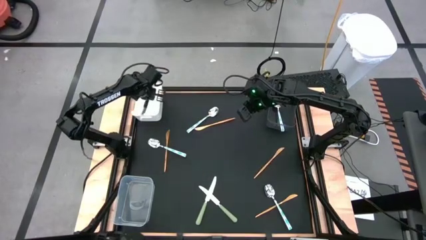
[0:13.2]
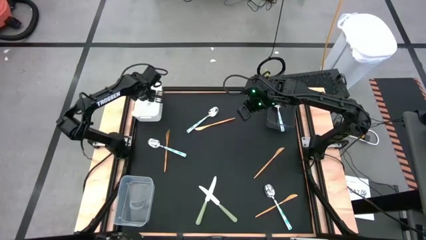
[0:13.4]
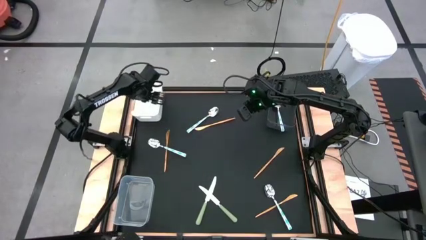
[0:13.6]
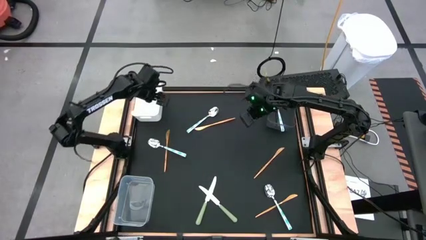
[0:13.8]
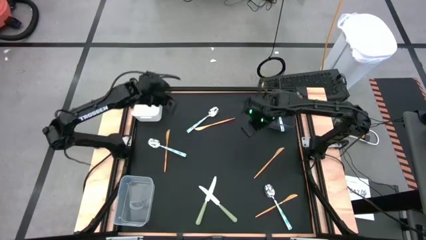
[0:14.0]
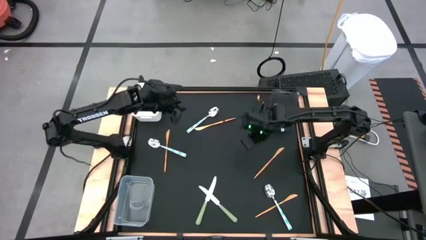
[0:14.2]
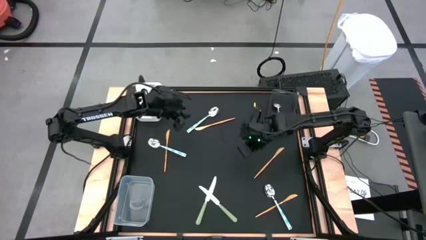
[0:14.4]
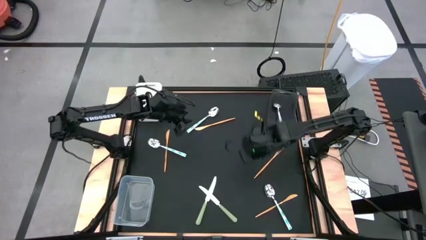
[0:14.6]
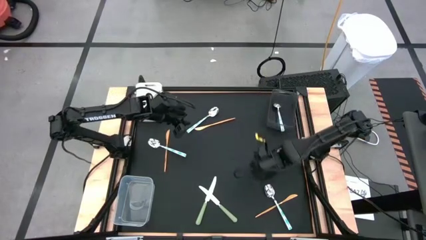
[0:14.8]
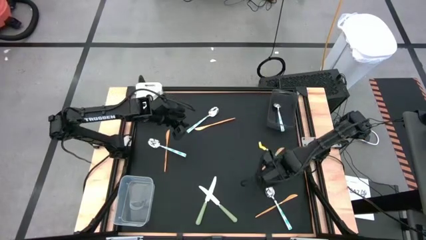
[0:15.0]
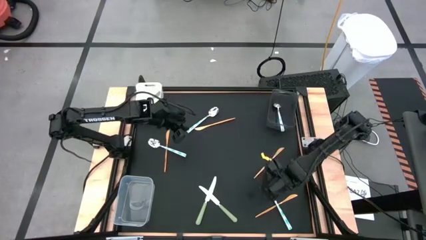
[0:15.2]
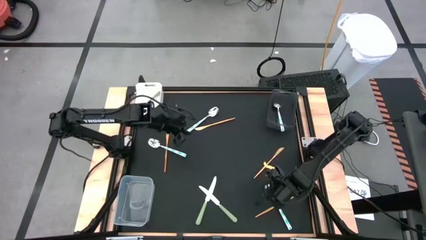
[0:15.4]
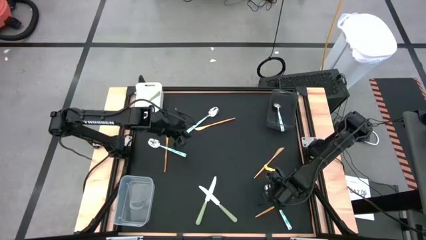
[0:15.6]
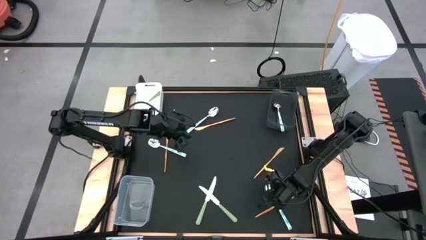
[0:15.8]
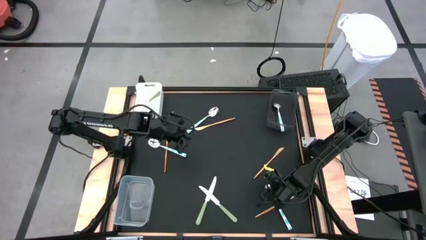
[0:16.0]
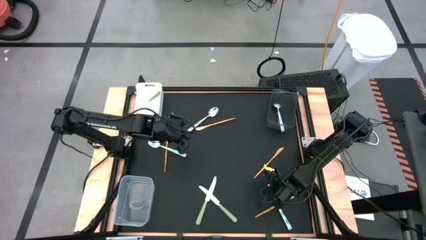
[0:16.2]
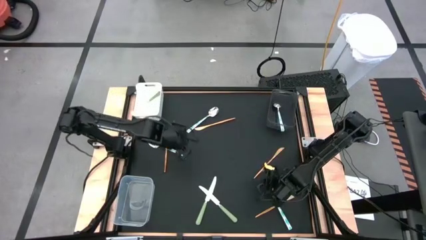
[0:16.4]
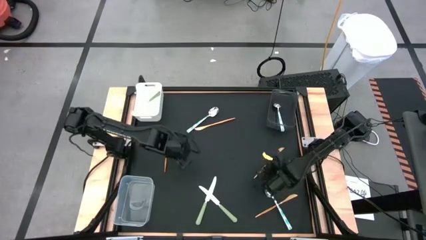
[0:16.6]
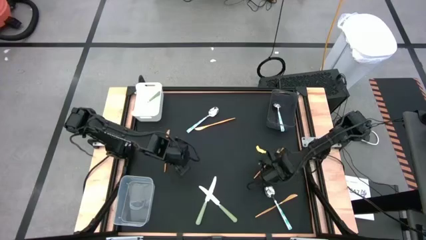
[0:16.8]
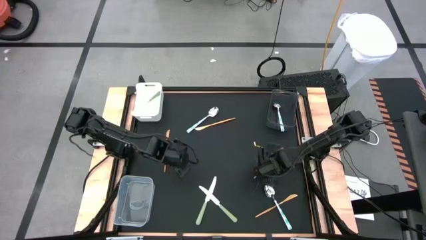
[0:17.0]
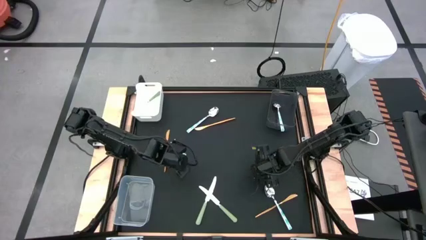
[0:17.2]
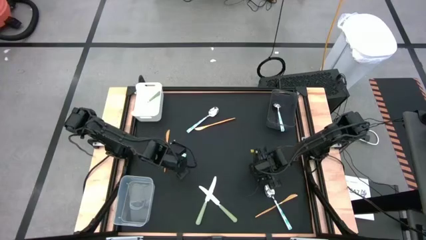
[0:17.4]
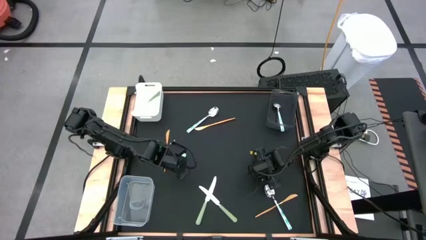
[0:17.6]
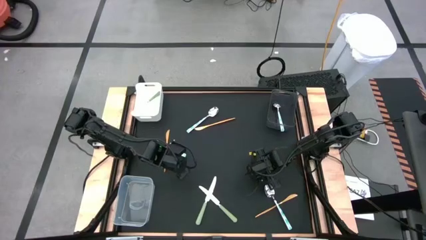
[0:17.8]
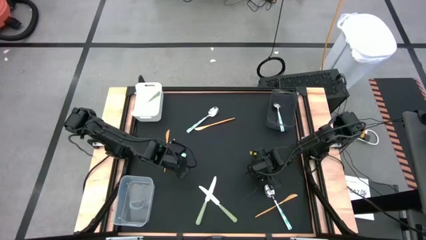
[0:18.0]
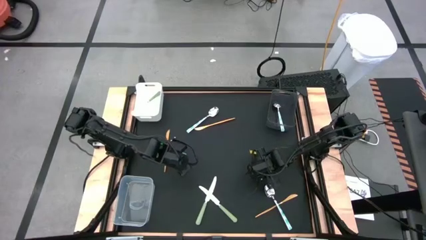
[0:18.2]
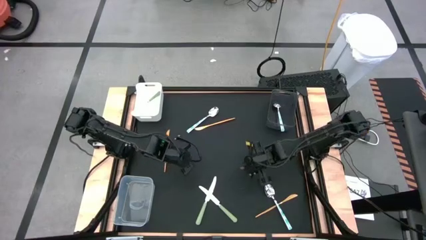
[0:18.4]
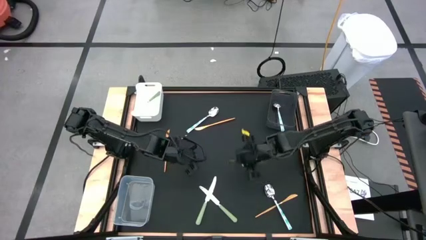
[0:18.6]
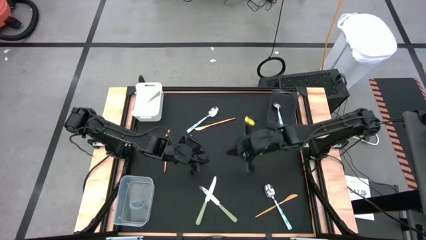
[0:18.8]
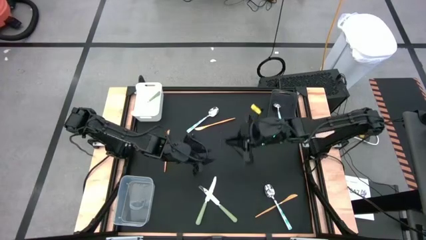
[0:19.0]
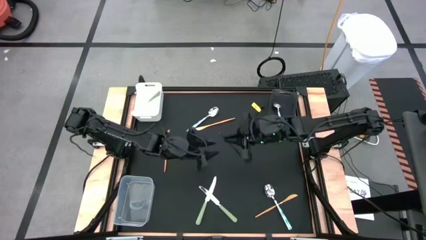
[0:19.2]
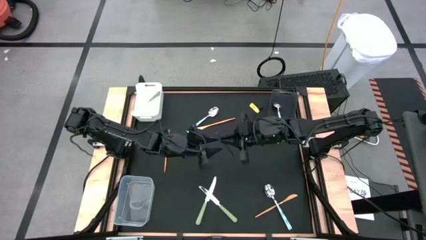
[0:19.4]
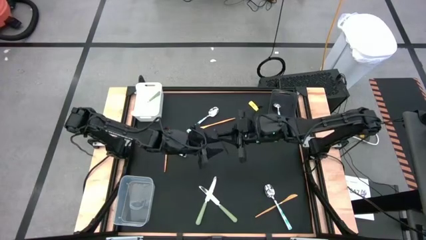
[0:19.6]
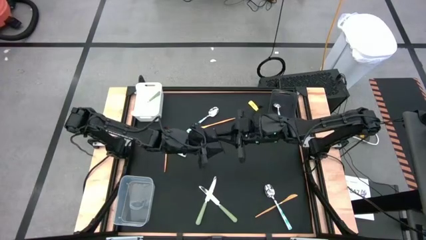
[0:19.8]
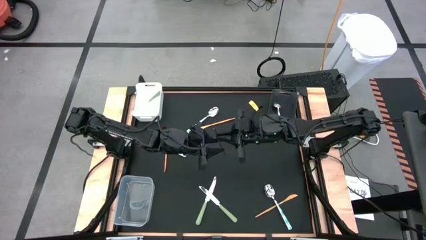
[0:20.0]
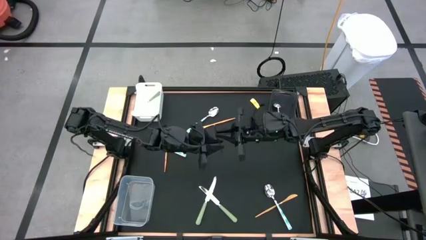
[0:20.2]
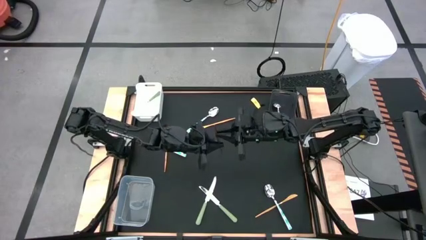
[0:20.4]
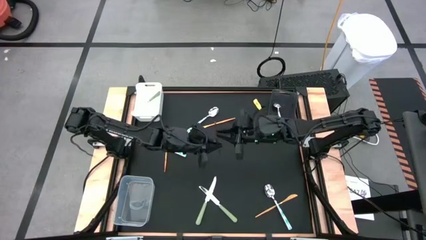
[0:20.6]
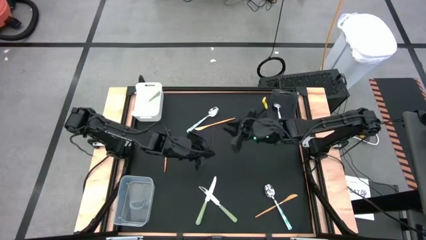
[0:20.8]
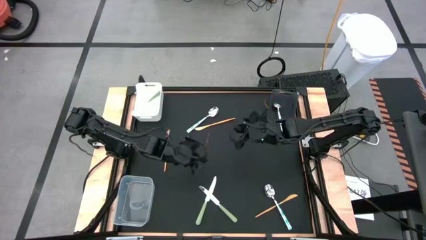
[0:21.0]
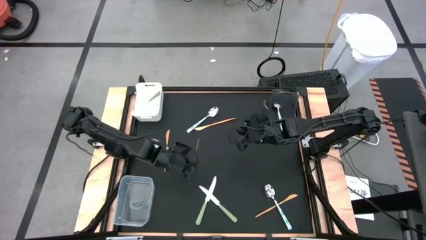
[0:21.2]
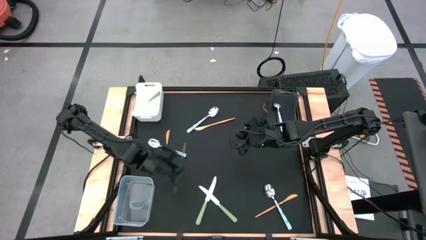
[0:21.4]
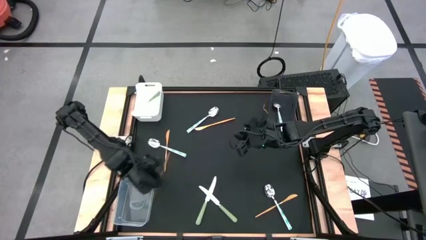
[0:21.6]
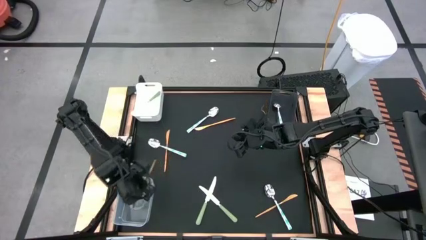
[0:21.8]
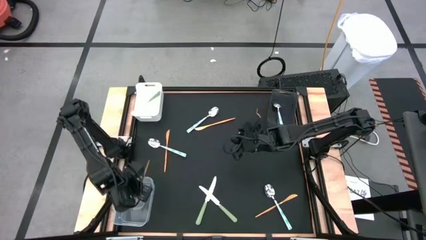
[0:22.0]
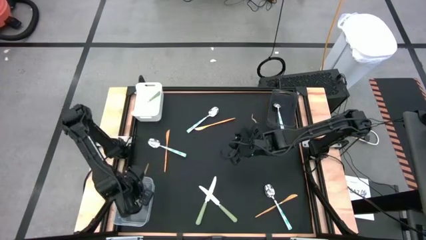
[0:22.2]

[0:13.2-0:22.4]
Task: Sort silverware by color (type)
Put the gold knife into the transparent bin

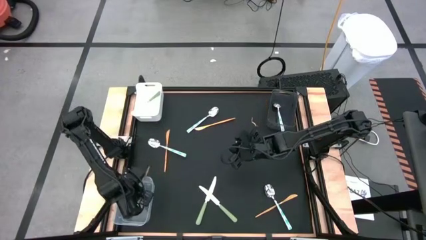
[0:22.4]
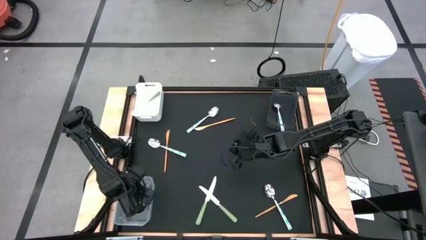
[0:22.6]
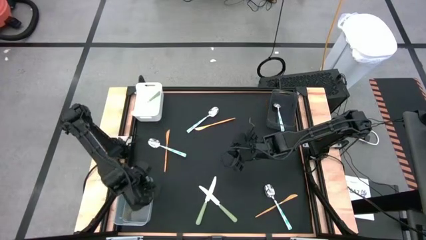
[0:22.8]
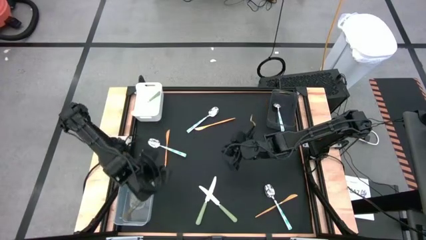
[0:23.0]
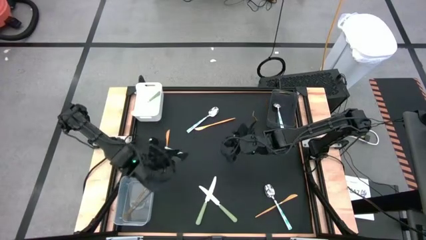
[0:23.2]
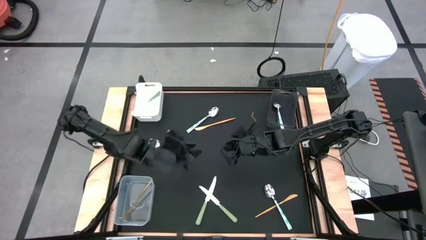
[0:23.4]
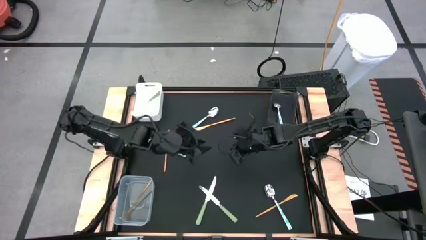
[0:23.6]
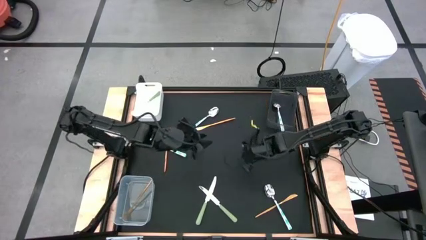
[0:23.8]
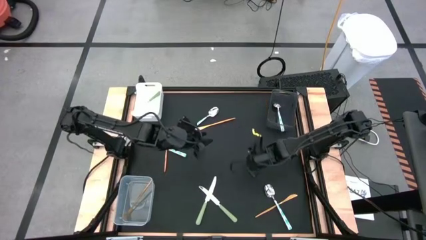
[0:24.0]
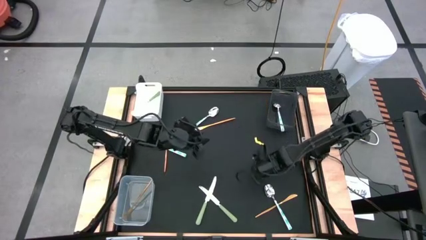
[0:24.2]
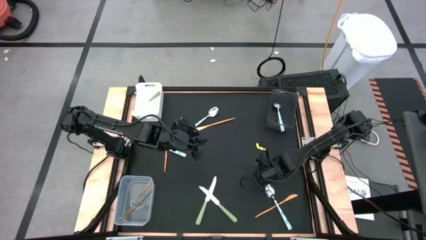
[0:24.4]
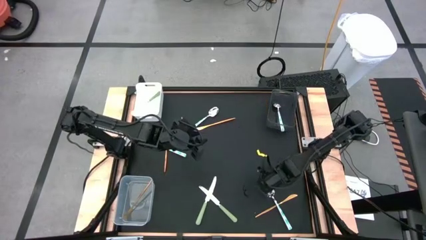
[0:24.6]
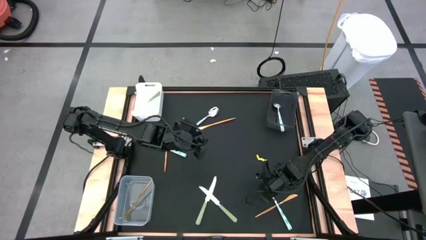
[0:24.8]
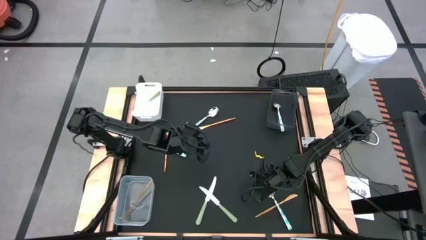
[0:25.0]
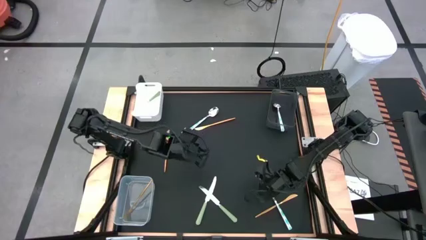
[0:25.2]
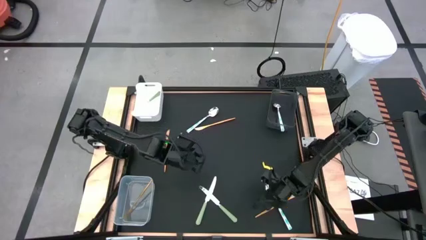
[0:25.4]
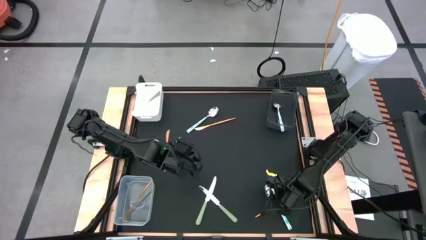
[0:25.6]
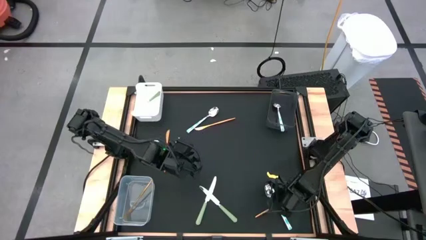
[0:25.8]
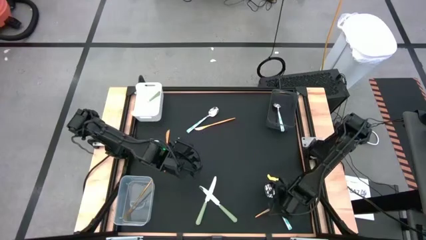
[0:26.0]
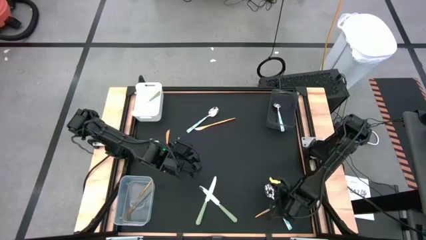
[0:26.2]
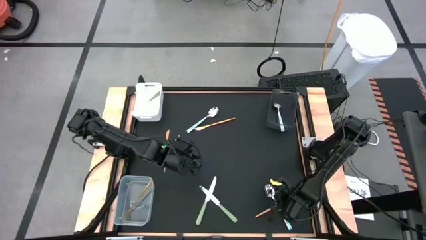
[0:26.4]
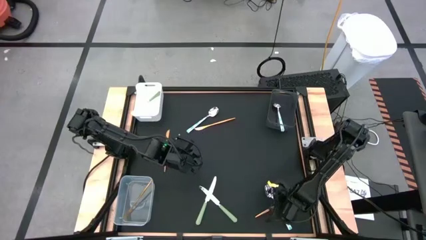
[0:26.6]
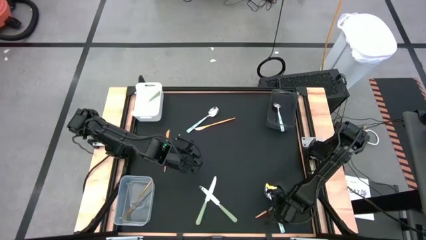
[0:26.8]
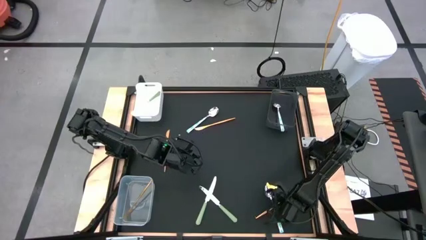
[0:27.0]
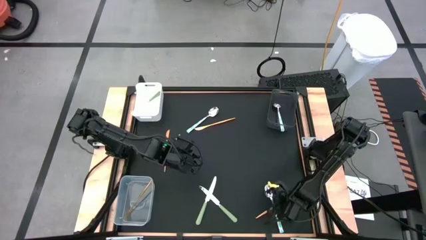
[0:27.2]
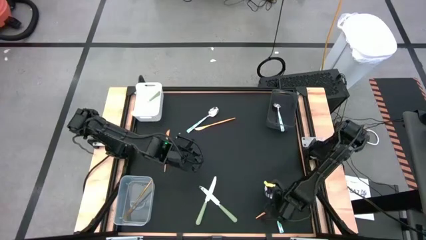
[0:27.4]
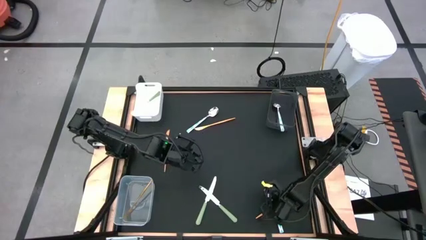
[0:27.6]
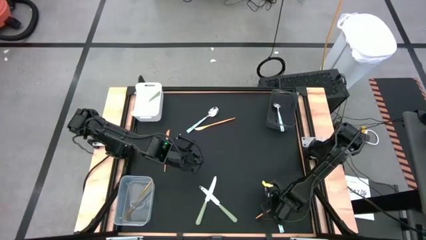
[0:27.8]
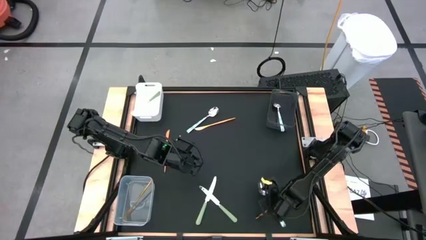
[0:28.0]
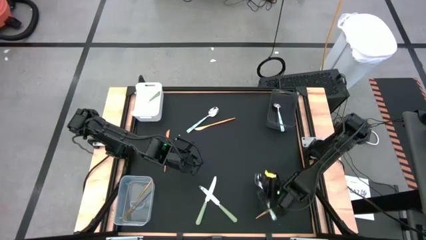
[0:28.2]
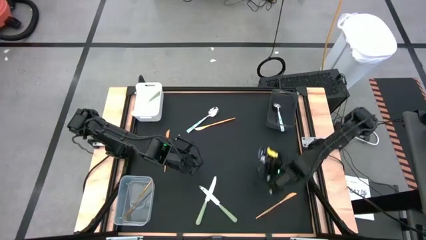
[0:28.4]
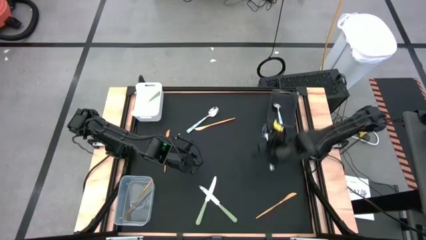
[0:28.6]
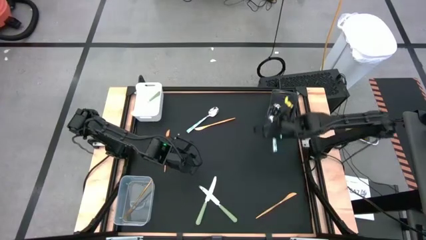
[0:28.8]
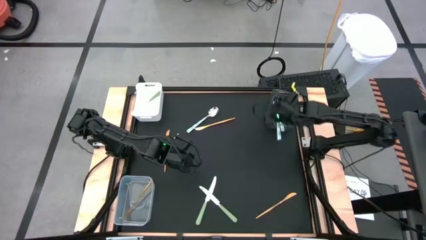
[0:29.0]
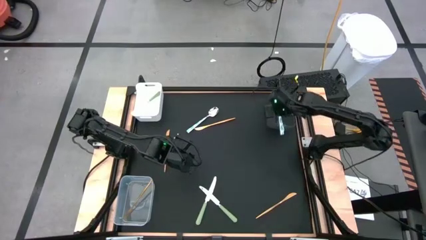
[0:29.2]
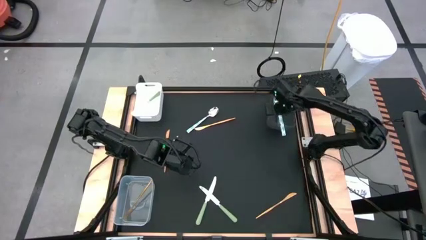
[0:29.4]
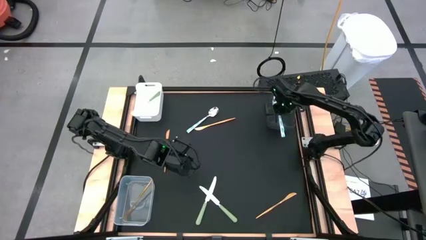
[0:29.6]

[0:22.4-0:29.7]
Put the blue spoon into the black bin
